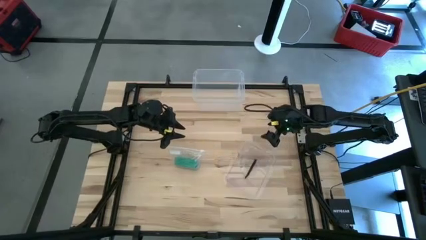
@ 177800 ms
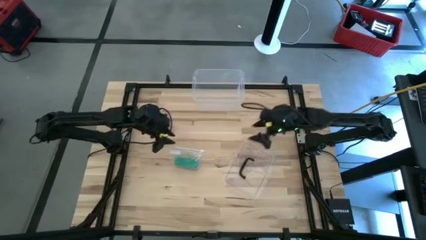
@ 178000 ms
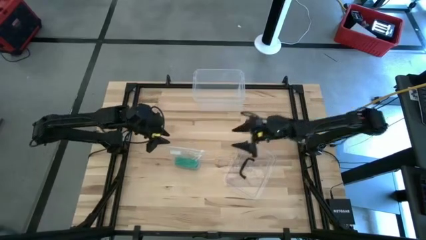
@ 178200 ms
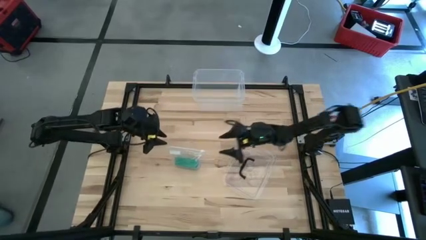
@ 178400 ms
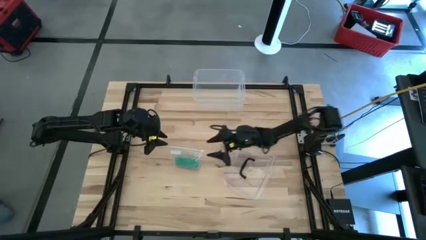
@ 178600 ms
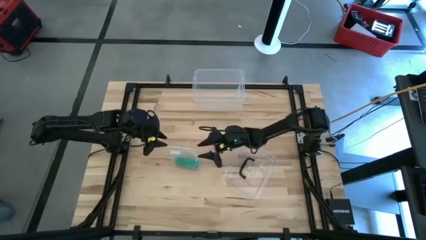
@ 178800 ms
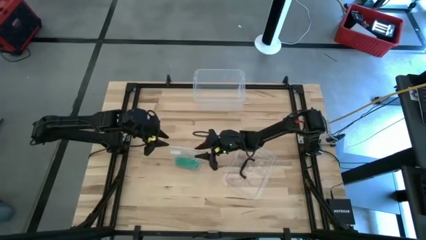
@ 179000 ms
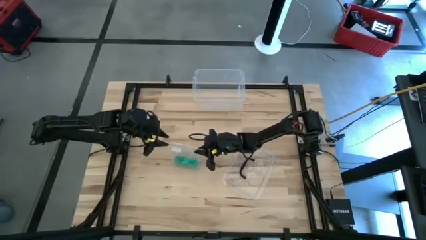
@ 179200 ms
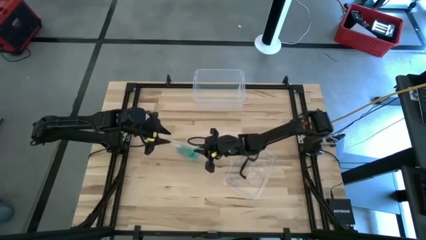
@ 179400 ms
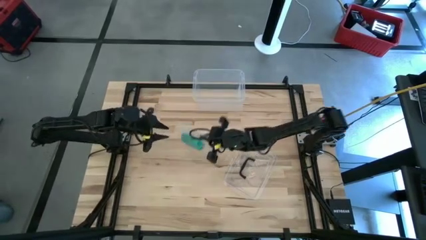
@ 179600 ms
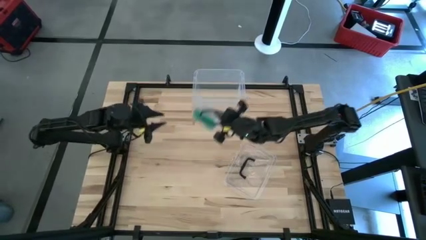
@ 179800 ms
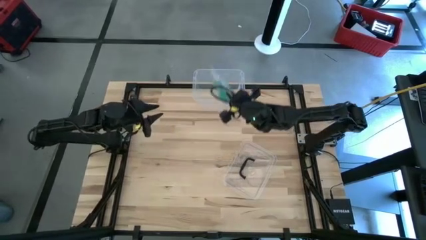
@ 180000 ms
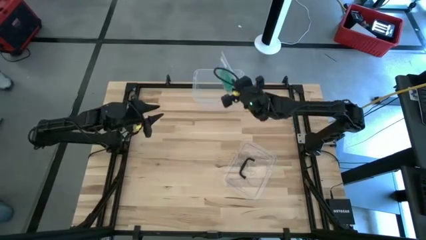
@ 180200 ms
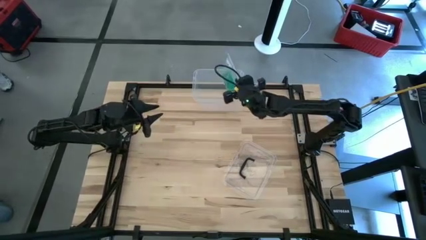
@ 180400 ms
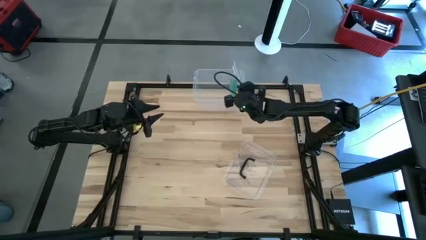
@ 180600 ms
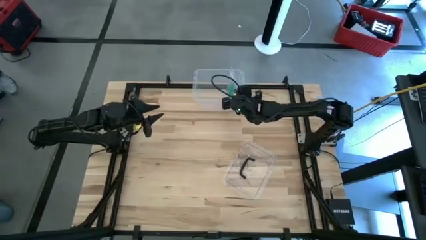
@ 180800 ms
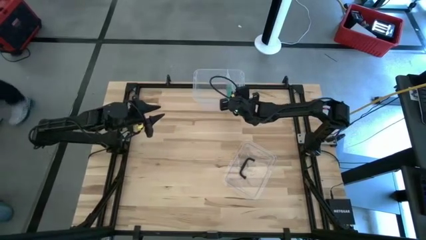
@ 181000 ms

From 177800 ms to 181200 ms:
Task: Roll bandage
Put the packed rolled green bandage into the transparent bin

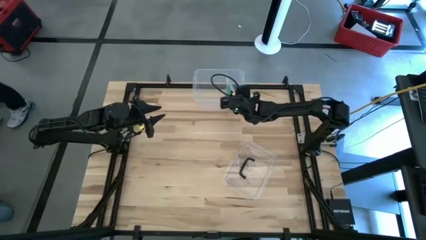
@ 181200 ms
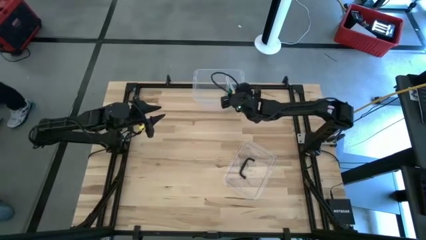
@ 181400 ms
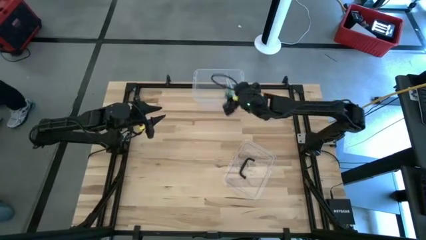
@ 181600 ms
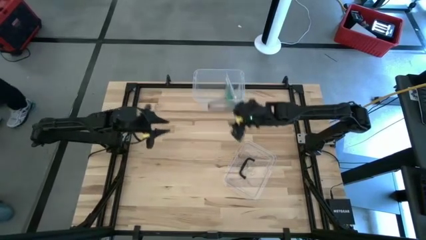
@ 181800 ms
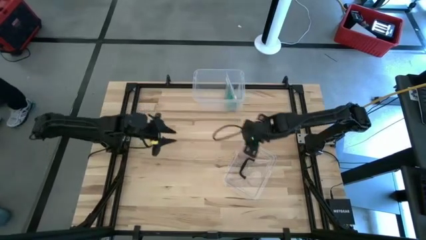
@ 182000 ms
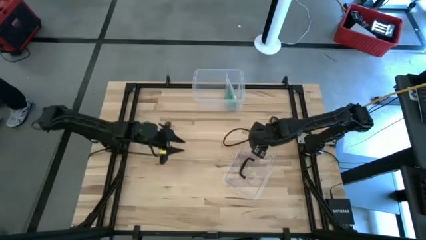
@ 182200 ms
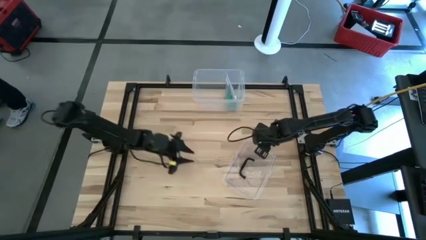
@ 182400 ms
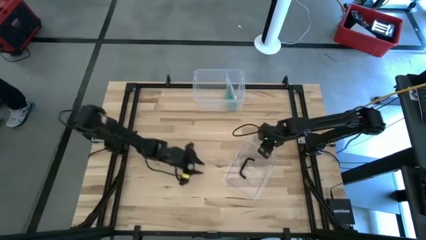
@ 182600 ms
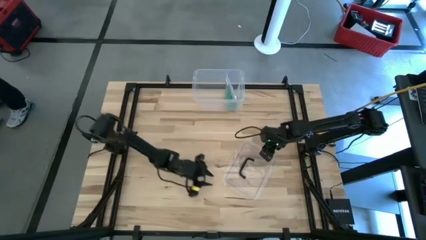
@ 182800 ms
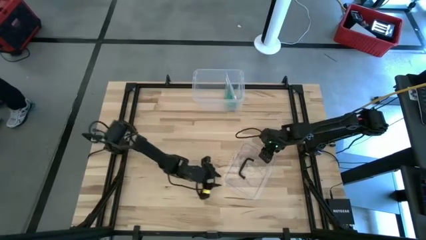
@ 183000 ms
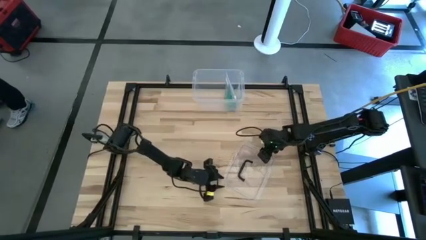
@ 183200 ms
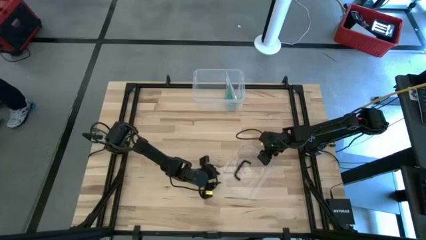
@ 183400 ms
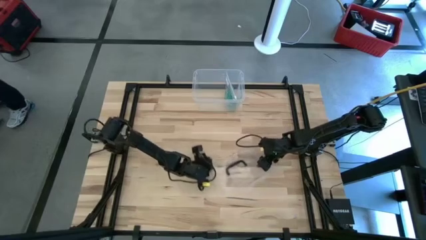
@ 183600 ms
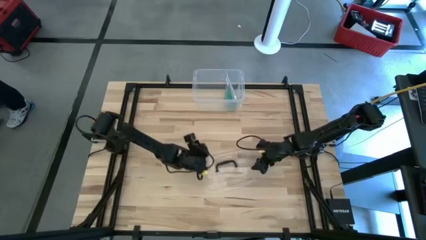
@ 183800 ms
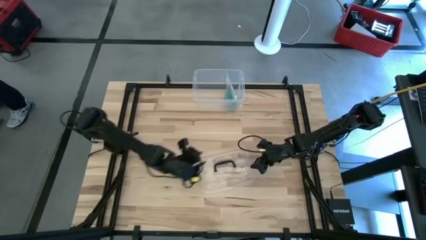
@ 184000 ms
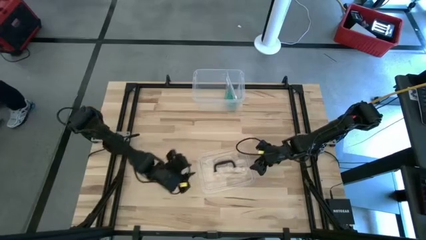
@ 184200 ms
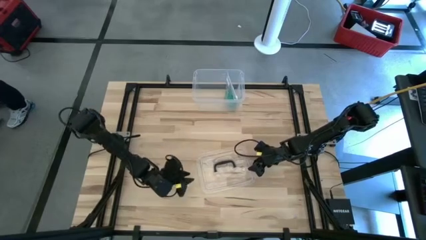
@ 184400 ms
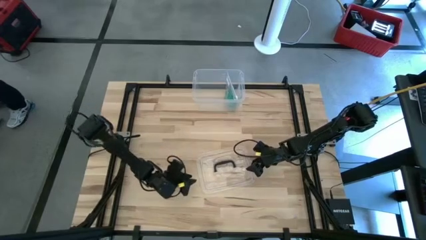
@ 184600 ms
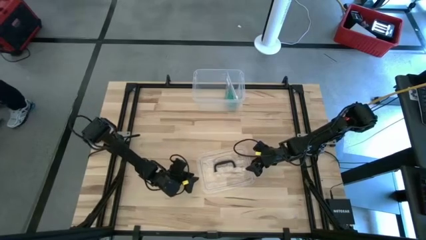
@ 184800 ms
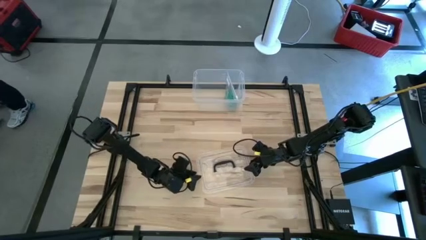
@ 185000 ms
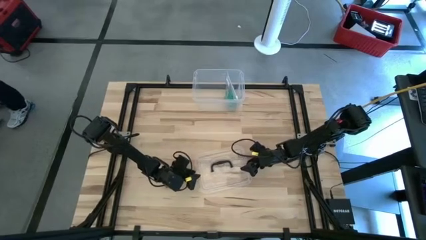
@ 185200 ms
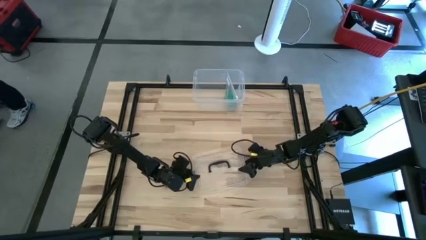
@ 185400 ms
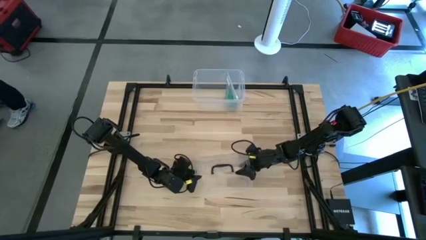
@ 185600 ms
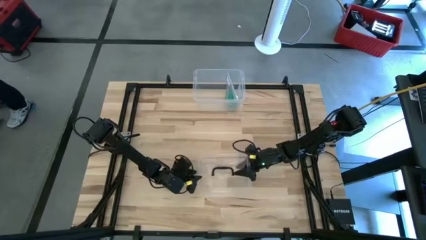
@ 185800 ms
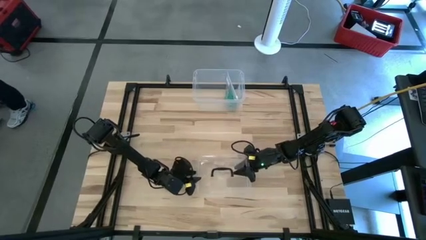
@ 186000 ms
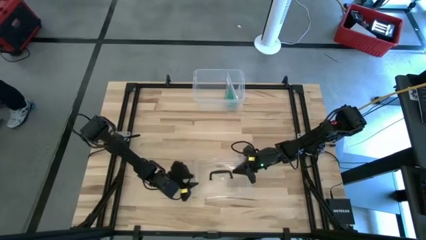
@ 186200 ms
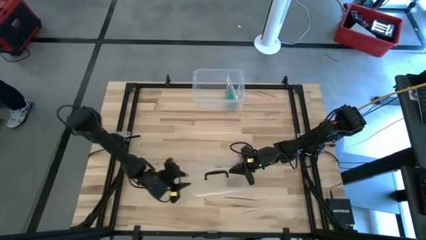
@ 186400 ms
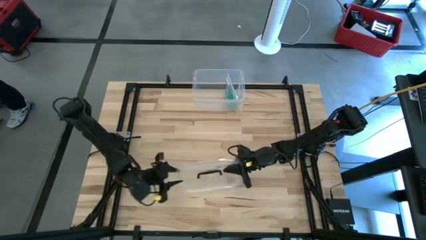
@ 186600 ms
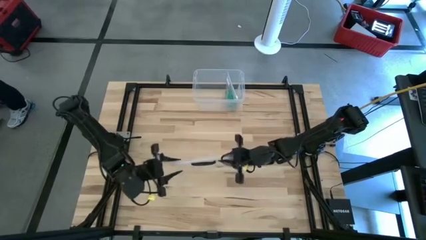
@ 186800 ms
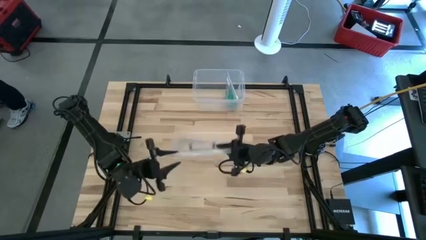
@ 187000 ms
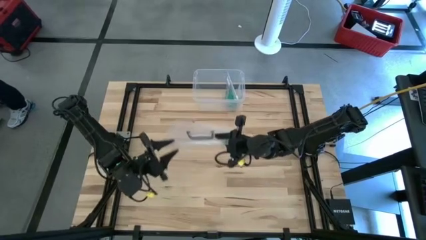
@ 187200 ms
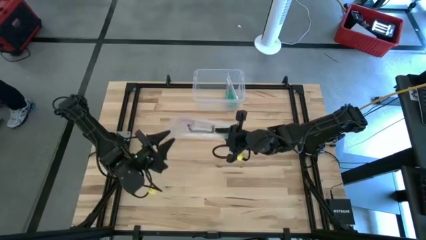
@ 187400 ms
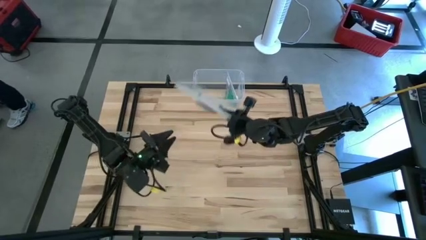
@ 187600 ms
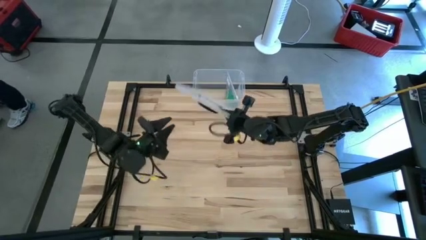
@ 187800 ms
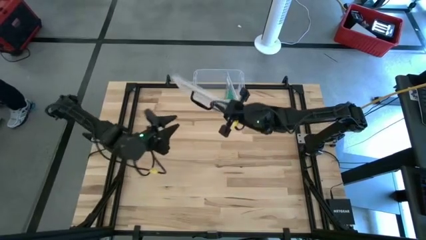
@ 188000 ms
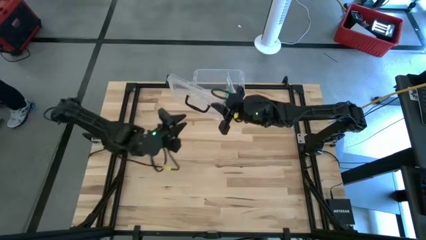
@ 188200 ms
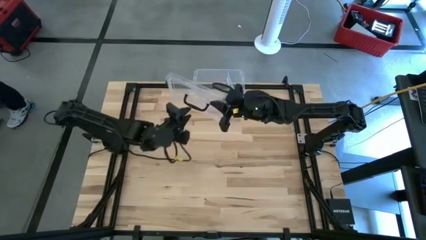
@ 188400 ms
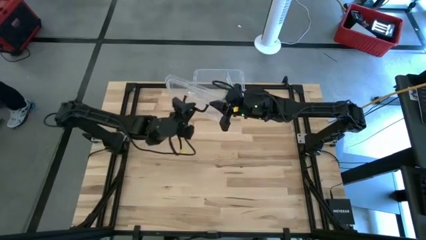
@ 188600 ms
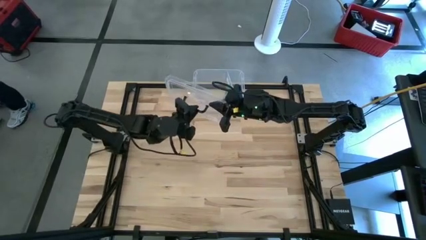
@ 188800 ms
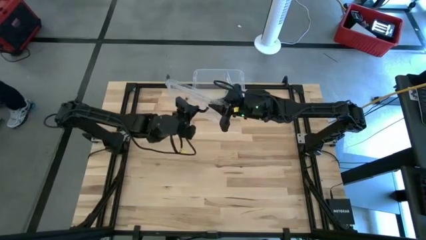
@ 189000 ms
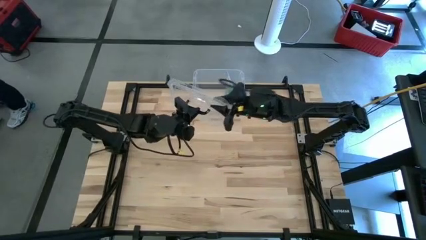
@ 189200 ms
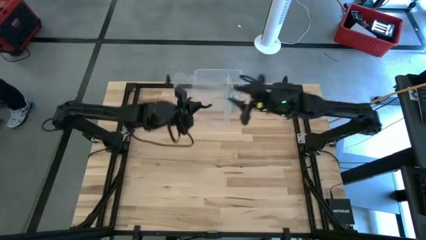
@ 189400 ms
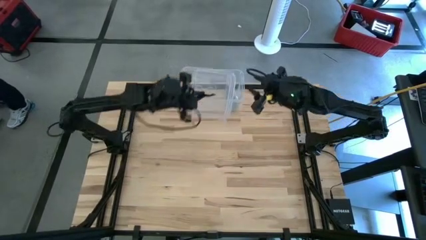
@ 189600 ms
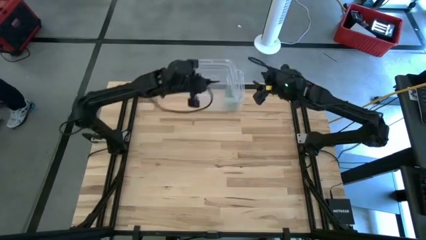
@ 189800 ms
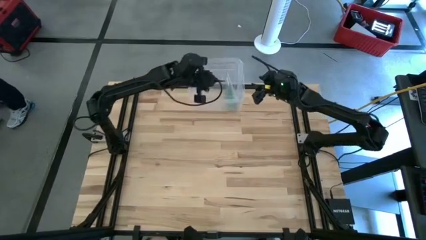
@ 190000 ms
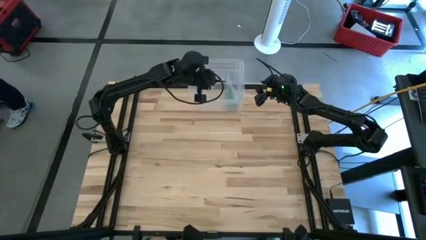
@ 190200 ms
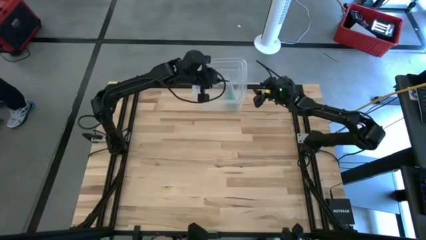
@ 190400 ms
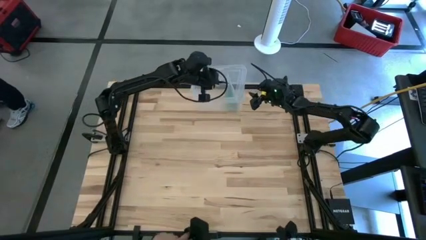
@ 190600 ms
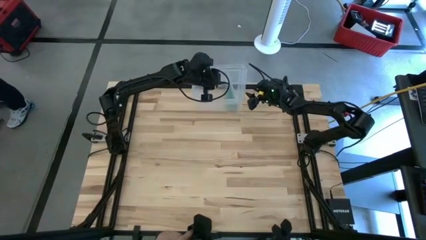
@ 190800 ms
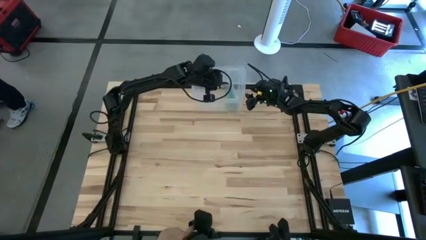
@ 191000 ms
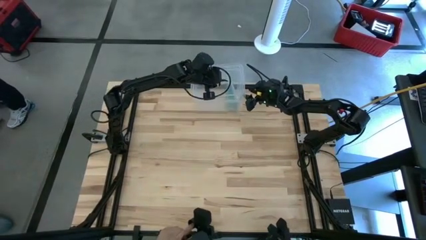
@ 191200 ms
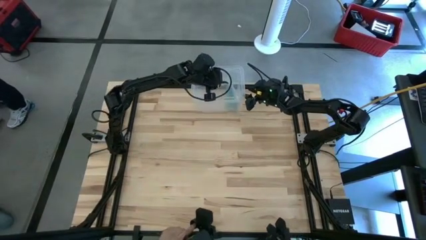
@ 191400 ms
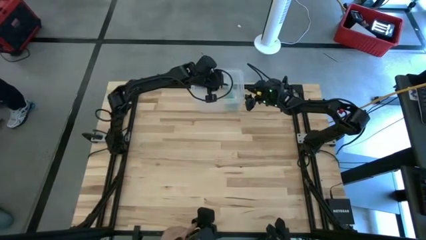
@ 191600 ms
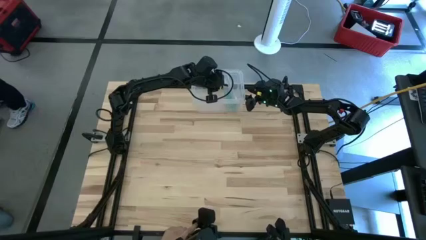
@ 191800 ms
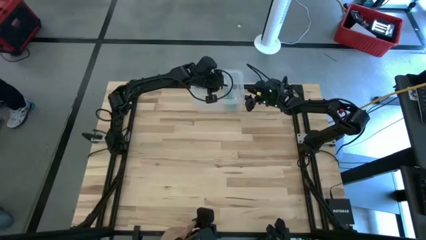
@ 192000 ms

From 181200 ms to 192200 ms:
Close the transparent bin

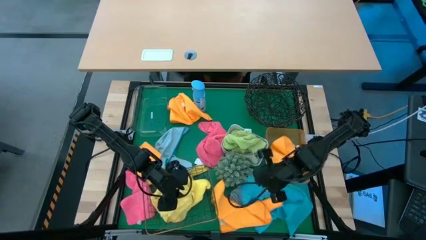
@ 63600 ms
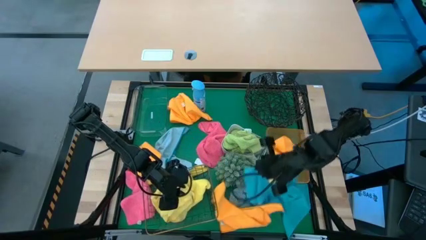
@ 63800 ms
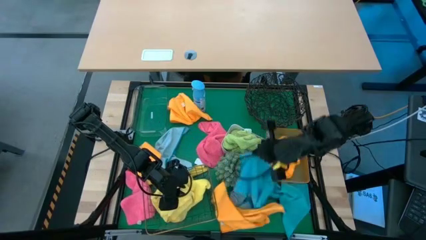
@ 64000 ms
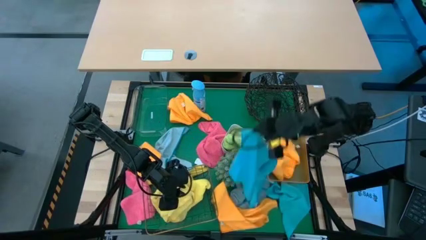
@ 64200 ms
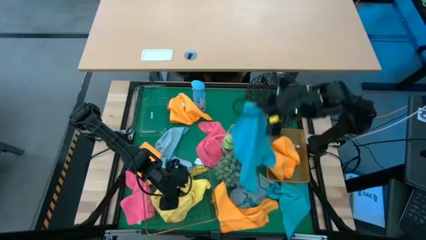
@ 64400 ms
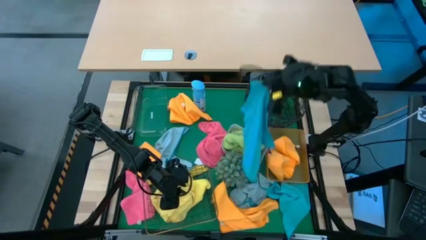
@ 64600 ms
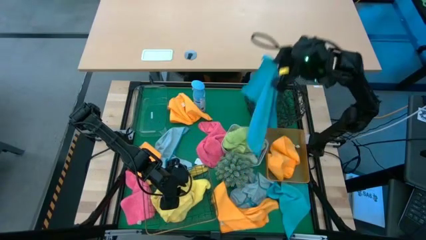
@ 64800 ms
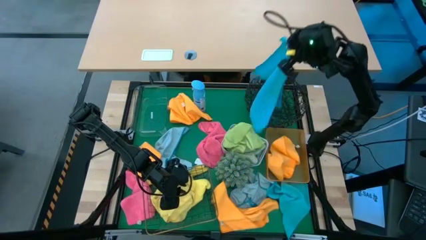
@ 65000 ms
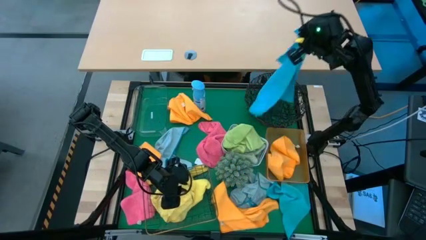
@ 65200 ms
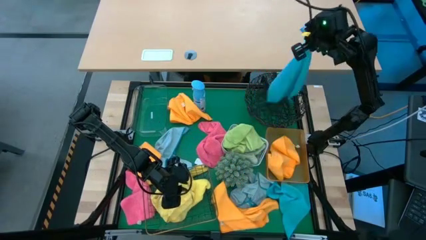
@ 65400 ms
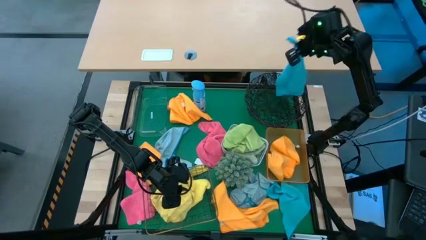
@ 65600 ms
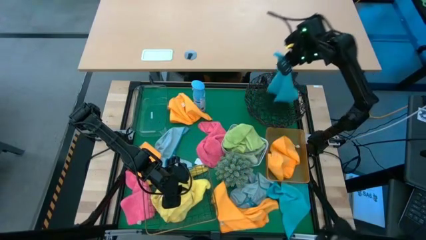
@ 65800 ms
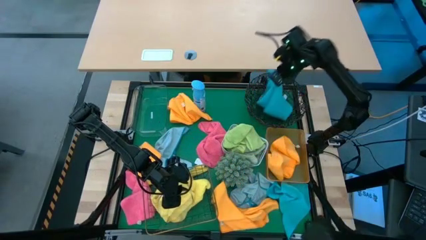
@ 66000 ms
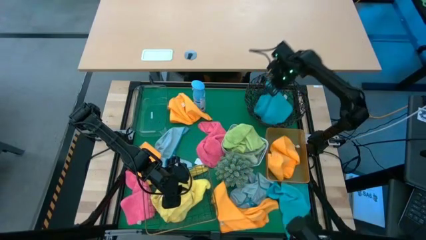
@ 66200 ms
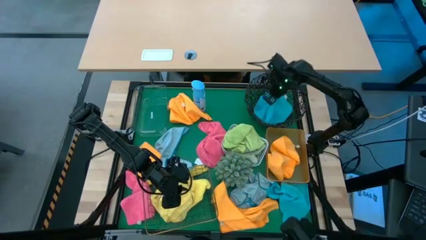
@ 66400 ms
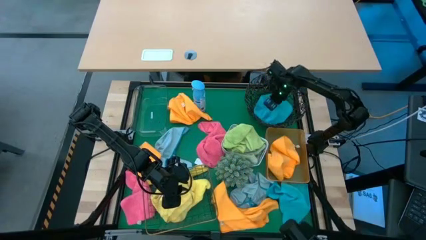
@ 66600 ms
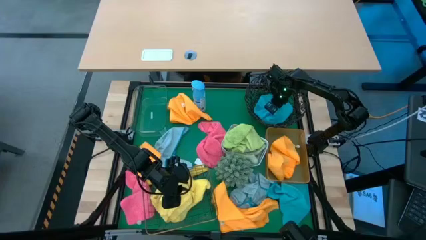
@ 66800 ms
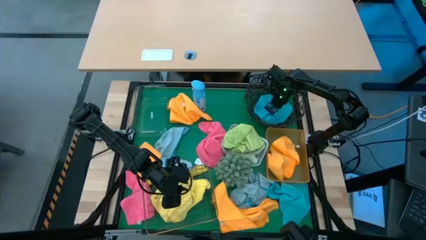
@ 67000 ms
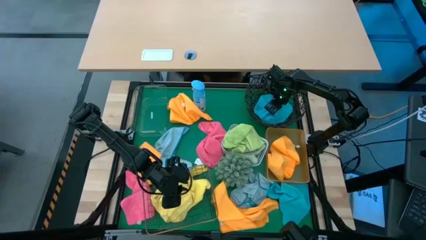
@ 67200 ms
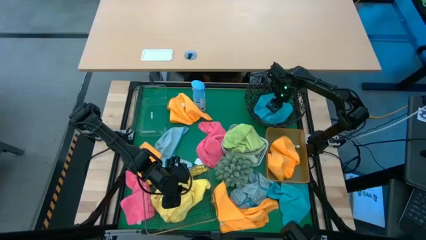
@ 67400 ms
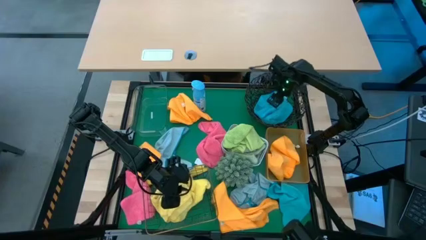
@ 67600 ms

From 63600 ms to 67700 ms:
Task: Sort microfiber towel by color & place in baskets
Put the blue microfiber cloth into the black basket
